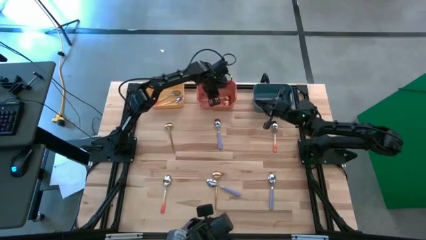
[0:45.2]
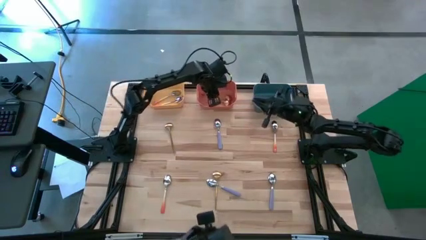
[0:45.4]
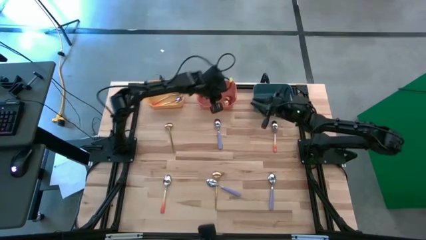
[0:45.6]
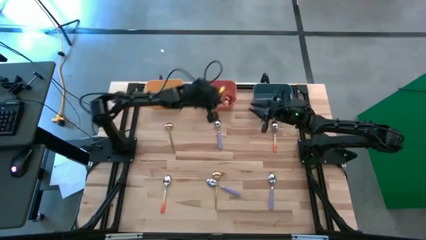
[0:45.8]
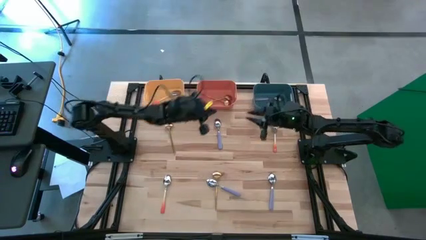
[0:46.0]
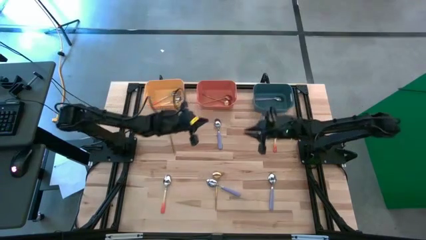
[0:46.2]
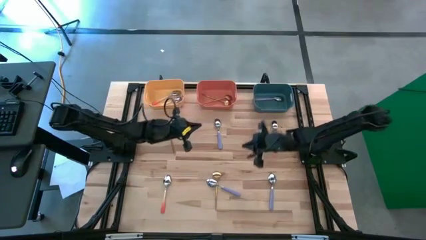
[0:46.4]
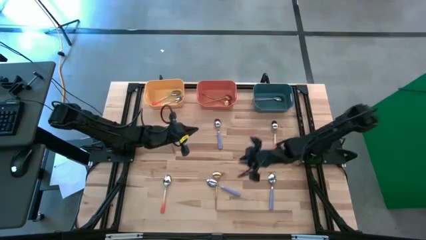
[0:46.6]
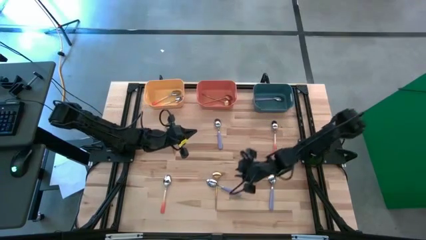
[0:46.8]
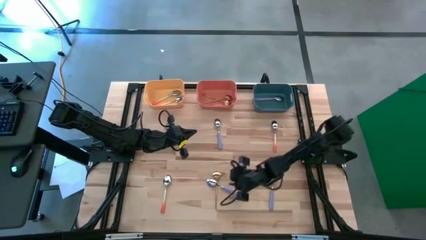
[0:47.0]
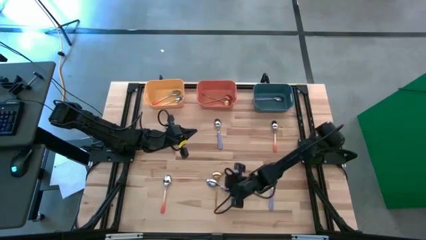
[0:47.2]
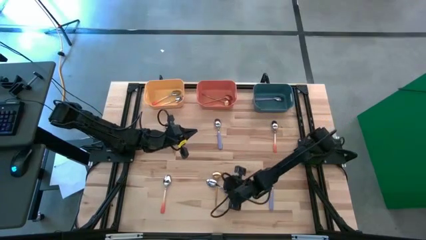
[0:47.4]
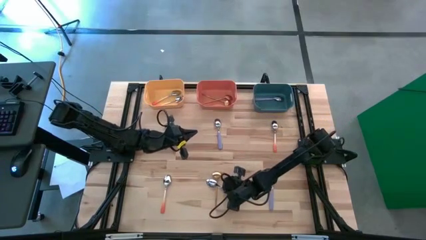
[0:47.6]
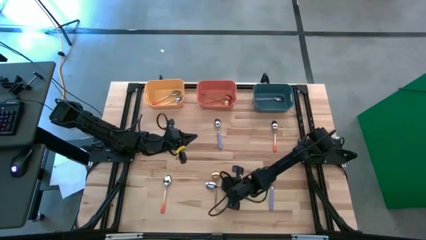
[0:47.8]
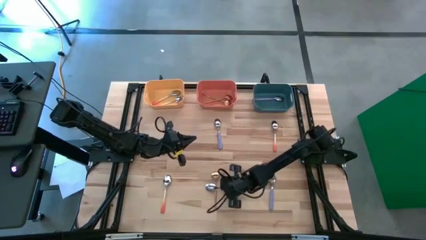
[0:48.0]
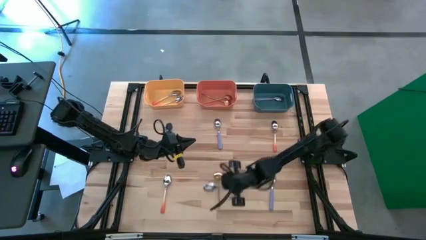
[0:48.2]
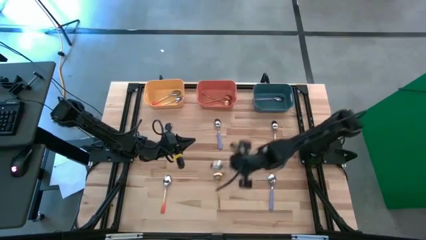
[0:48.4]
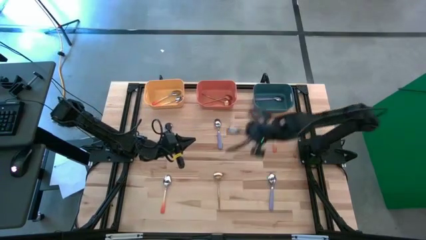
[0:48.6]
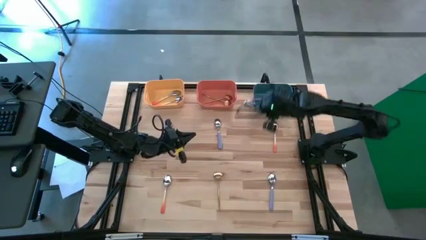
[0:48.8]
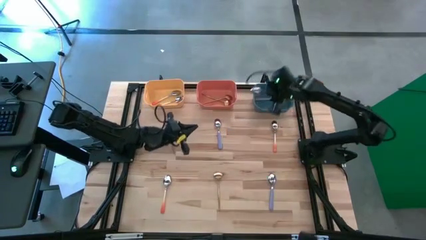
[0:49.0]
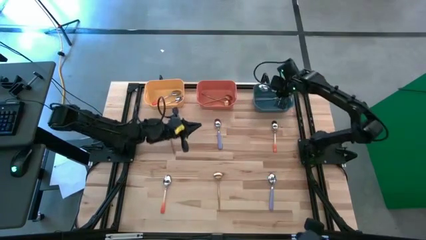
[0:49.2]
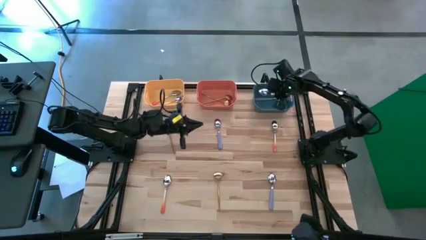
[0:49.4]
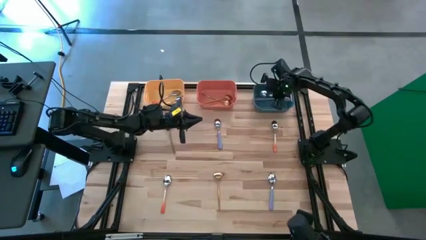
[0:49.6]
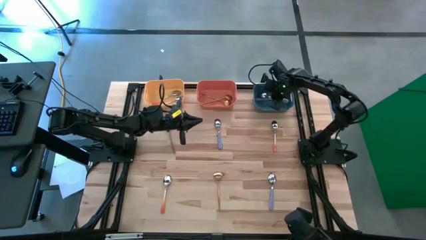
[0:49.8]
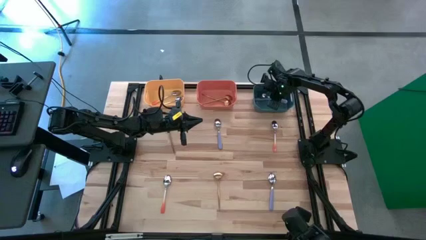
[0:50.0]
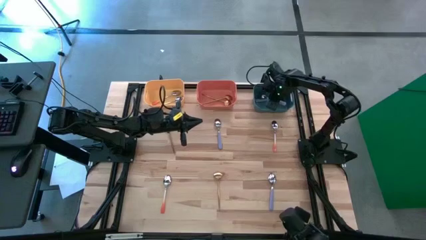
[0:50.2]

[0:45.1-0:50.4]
Task: Sort silverware by color (type)
Put the violet spoon into the blue bin

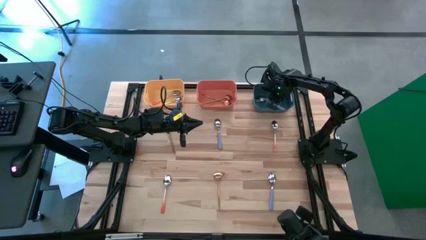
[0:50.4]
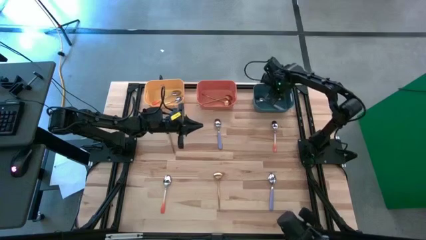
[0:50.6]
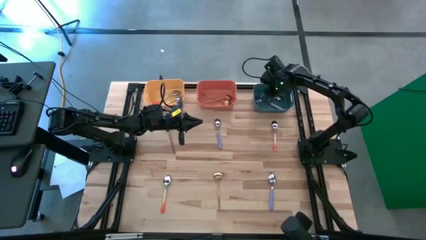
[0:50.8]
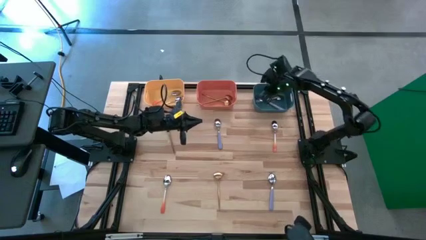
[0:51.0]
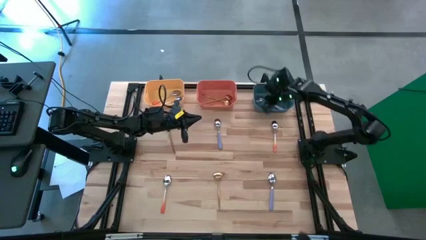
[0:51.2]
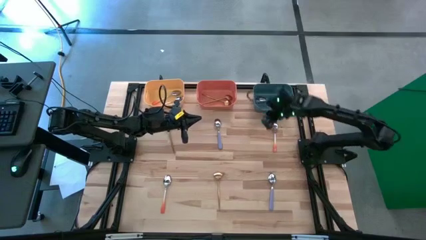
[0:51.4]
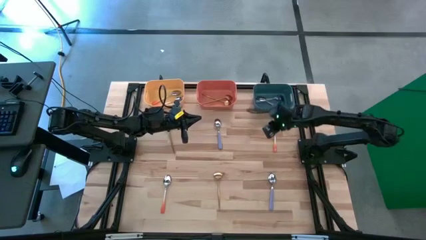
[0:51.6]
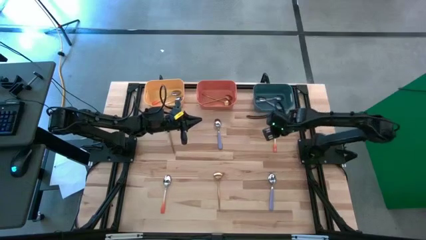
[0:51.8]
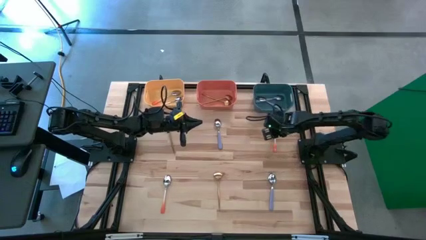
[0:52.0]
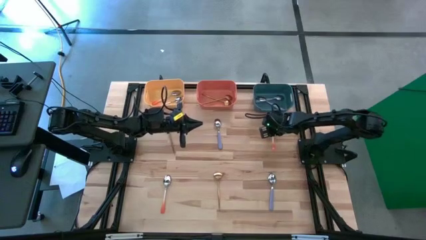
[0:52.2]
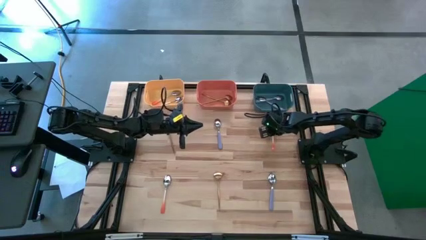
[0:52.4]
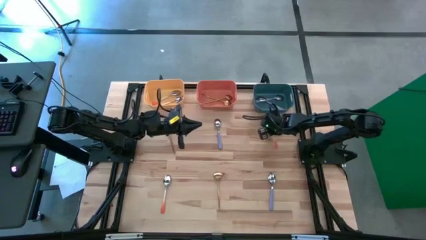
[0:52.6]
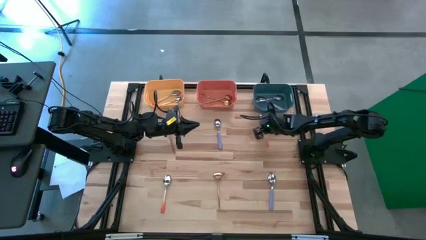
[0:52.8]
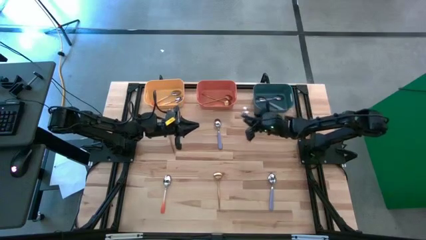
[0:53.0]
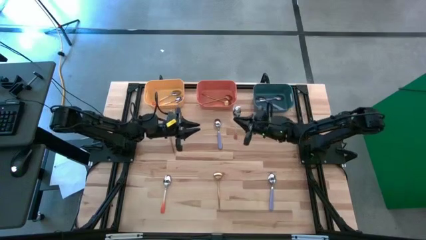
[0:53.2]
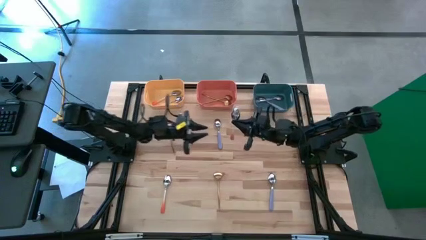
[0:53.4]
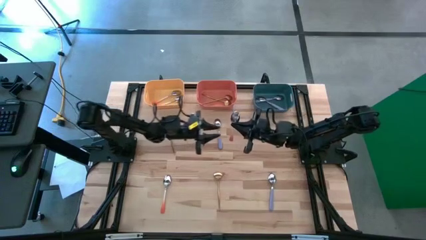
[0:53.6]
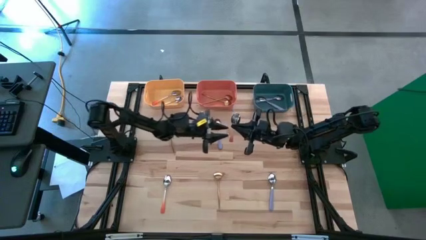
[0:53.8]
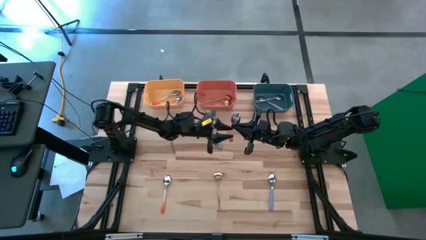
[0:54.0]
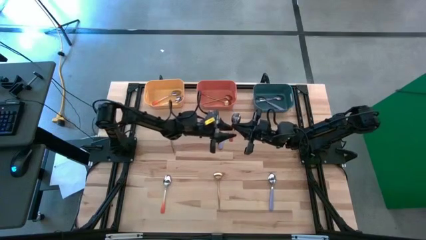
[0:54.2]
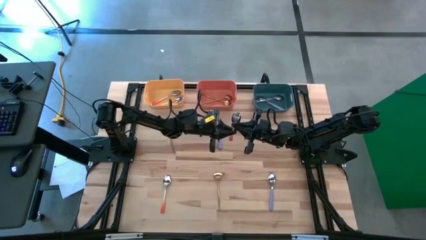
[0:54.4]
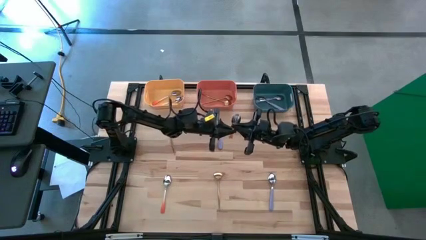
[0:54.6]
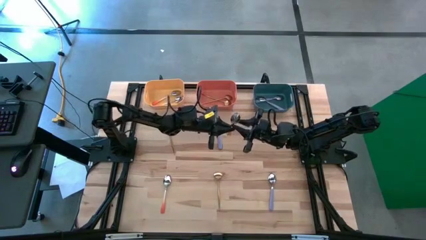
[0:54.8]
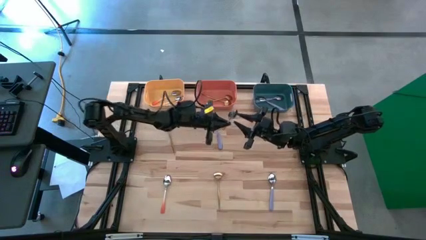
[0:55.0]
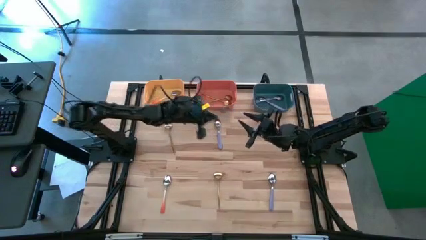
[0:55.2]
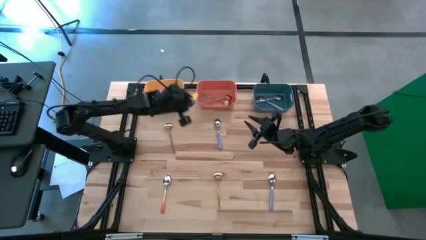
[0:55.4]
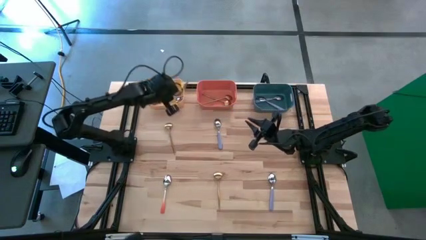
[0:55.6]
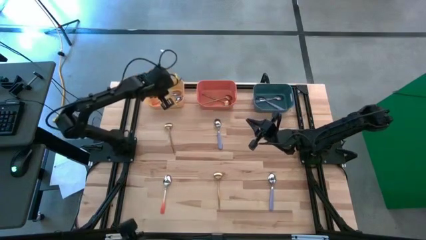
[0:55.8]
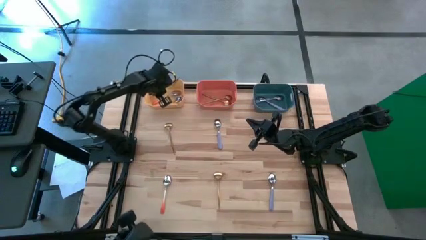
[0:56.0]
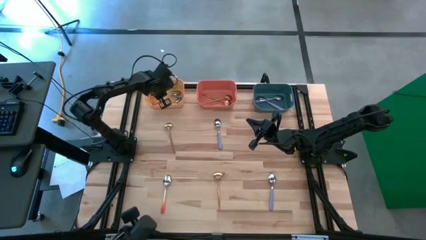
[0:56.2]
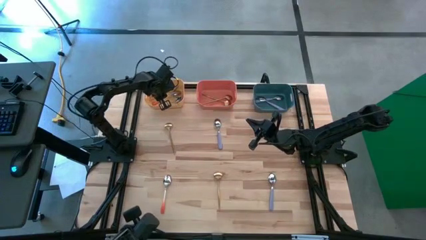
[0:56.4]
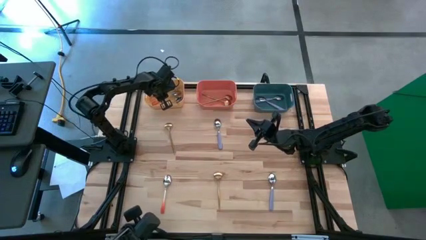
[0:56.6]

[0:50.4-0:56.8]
Put the orange spoon into the yellow bin

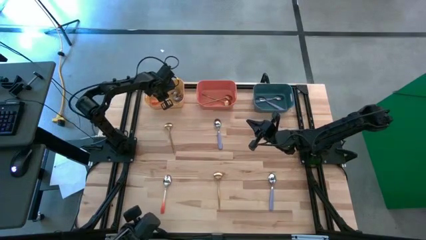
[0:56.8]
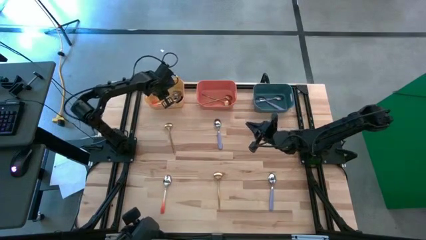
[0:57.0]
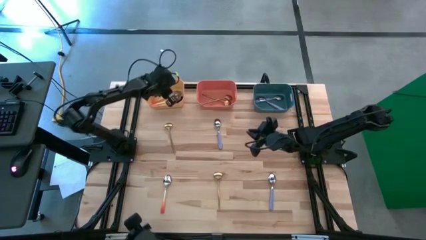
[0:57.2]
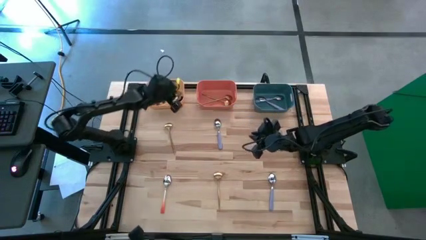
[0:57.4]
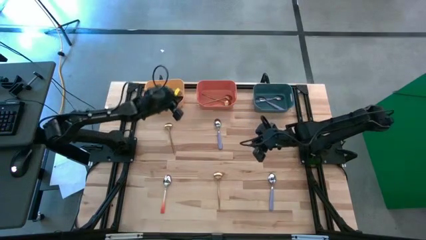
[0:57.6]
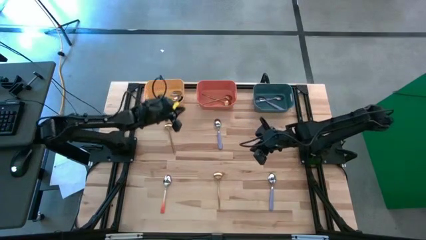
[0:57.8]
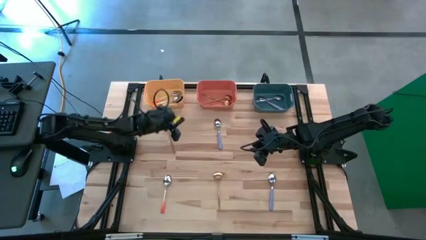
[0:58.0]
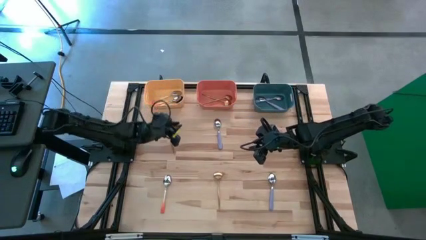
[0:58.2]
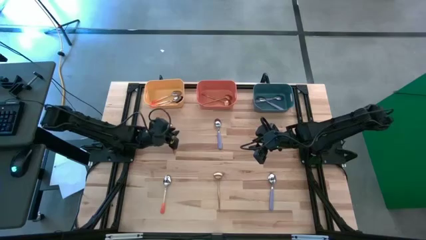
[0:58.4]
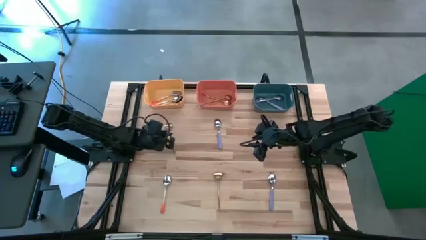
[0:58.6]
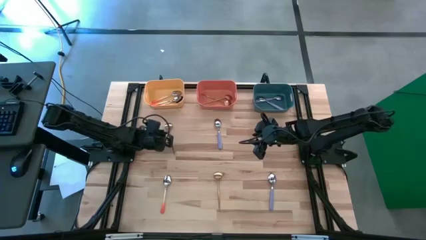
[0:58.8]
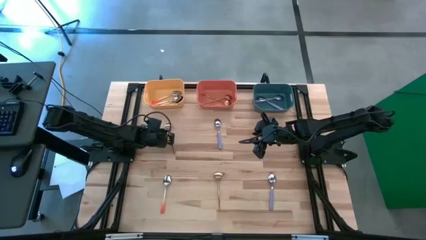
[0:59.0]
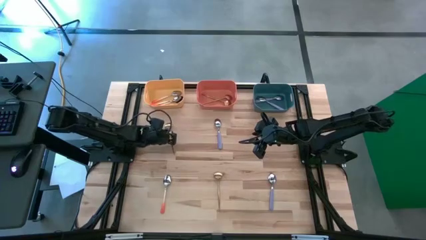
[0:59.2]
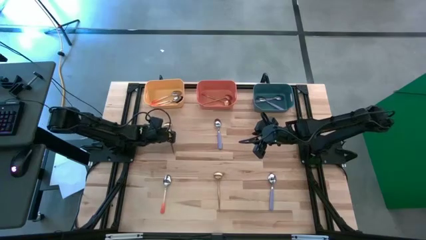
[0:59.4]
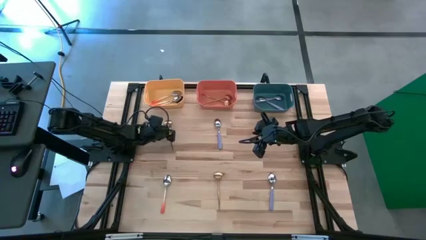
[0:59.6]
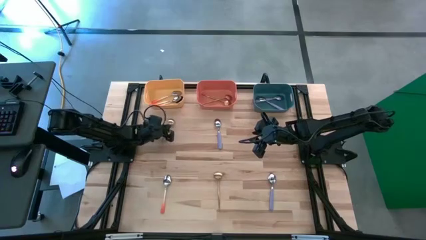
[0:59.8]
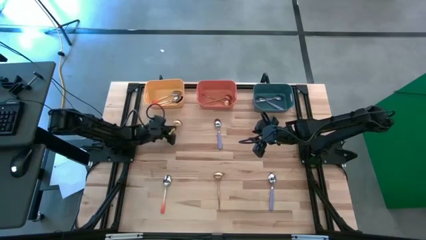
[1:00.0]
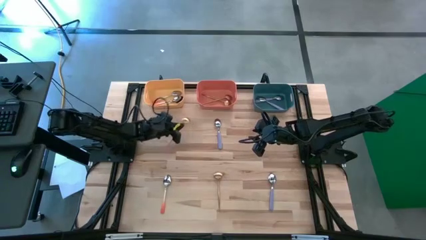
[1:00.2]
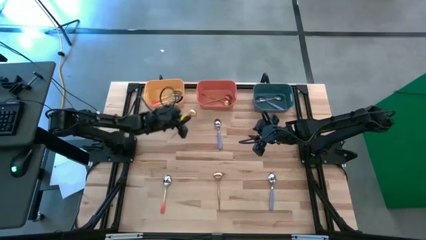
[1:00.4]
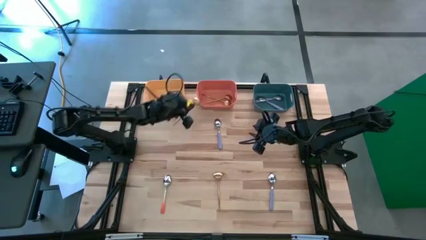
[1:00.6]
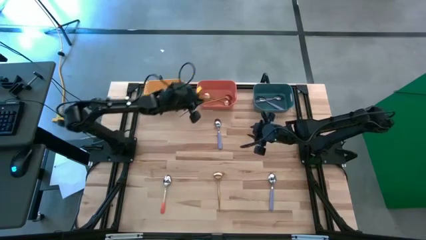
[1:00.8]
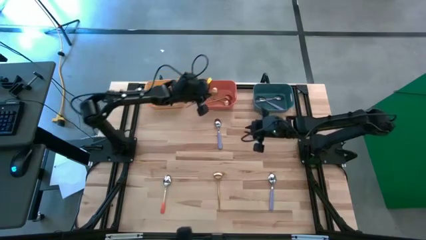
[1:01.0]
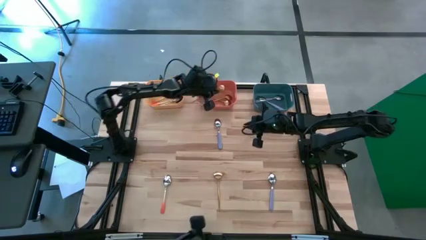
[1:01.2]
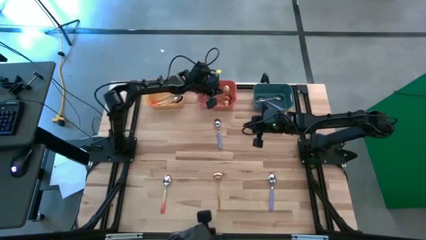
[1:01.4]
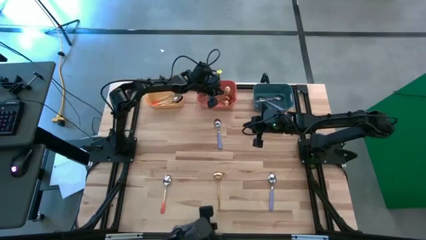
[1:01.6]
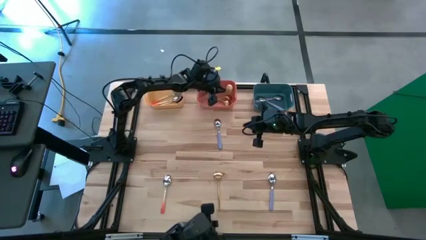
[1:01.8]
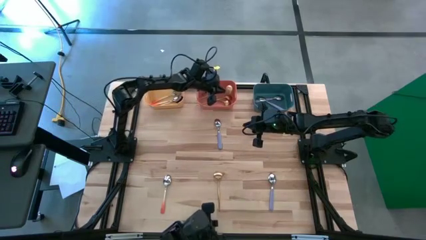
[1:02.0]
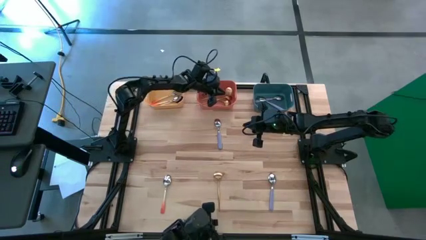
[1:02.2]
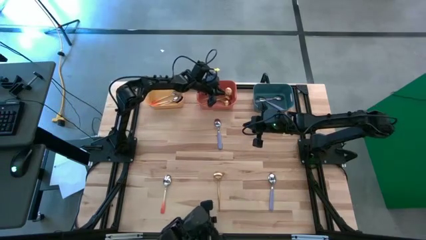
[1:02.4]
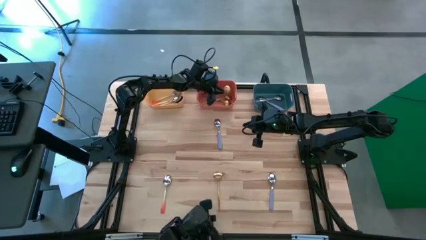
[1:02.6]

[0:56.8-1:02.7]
Put the gold spoon into the orange bin
